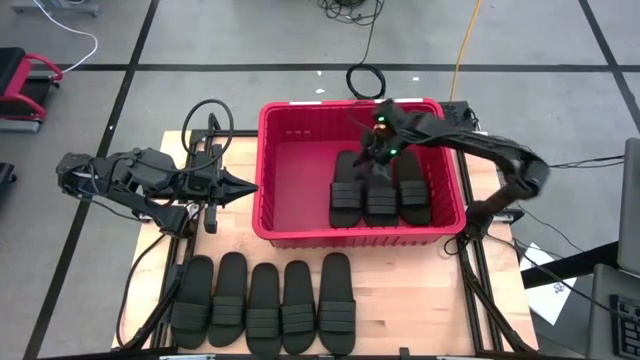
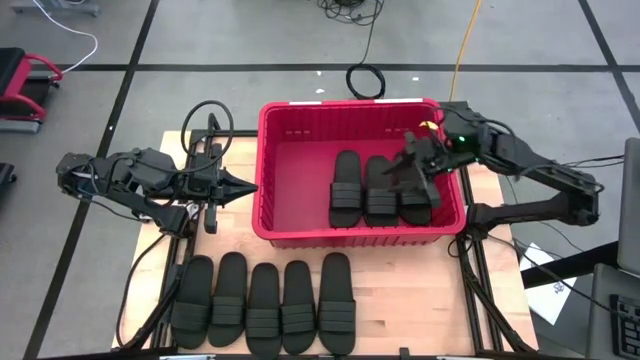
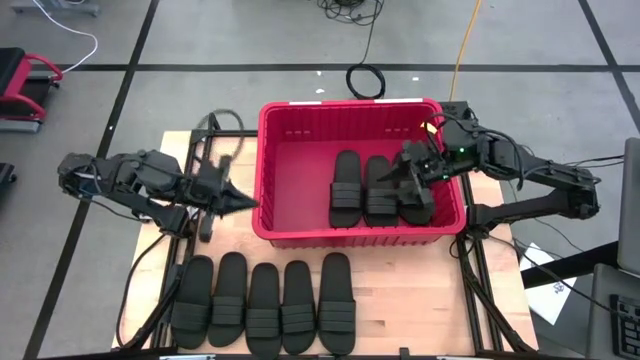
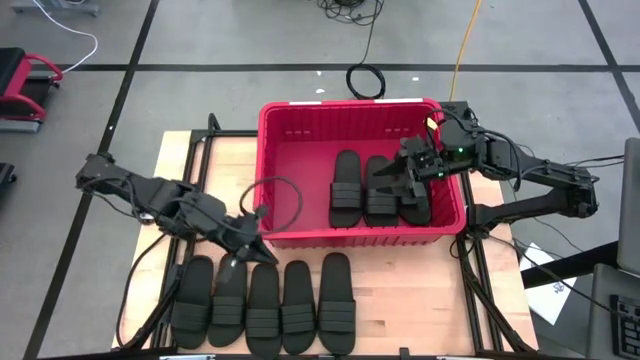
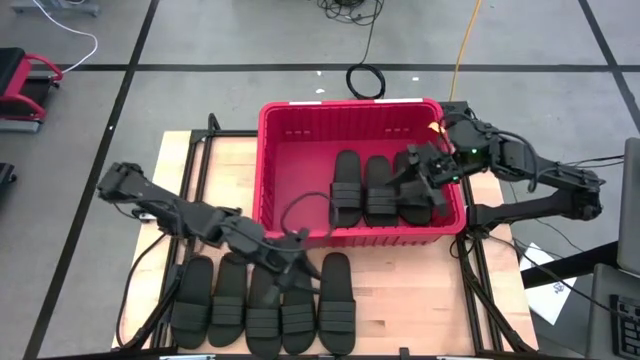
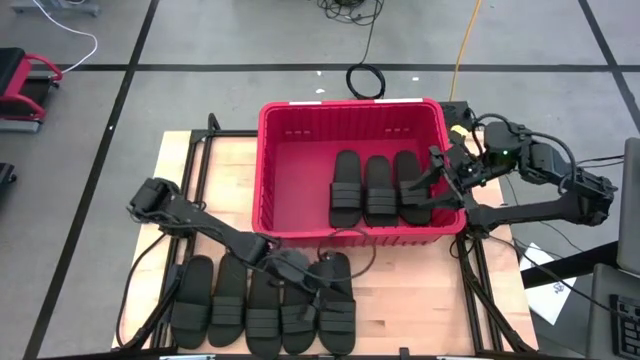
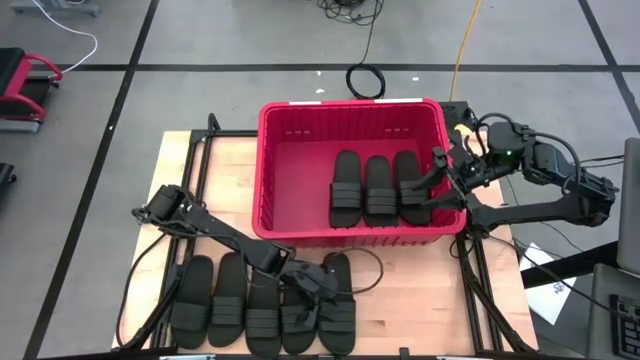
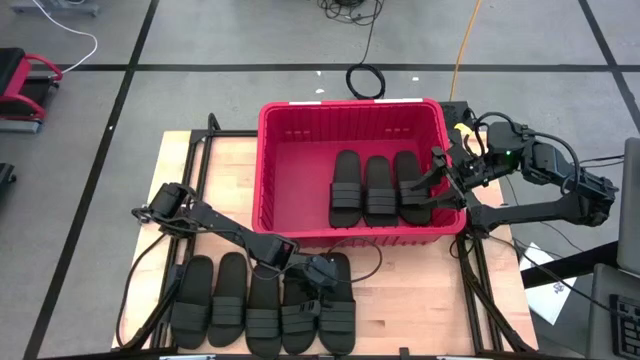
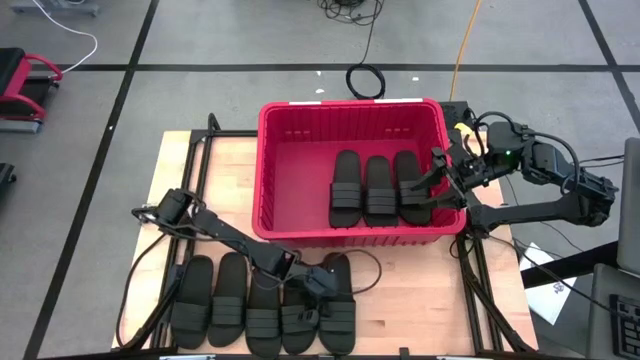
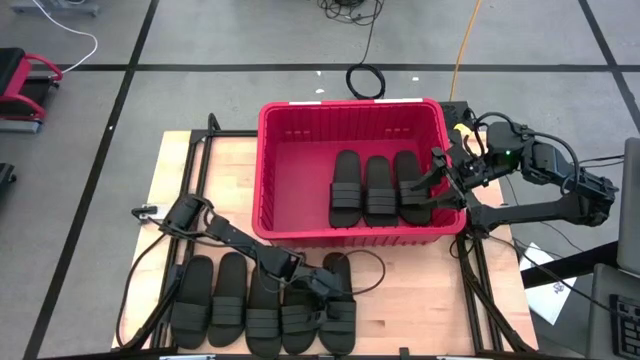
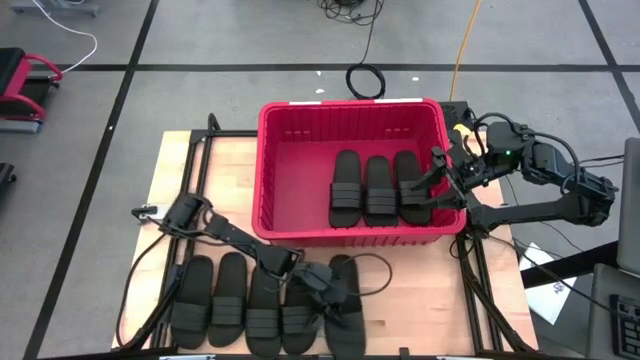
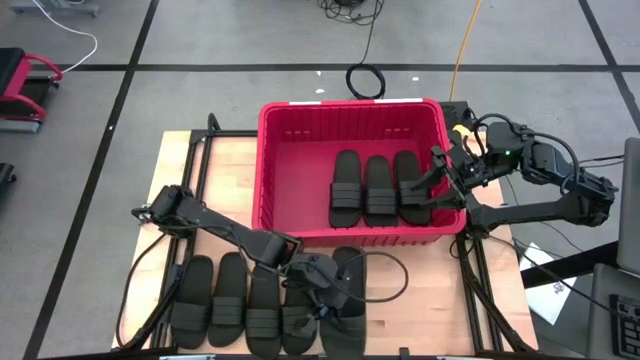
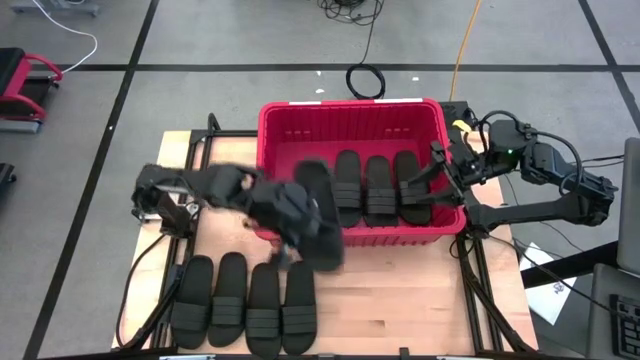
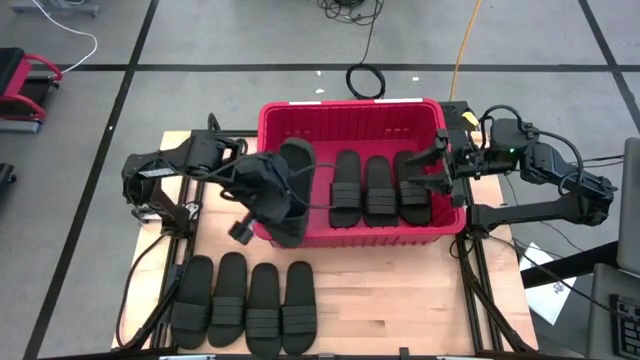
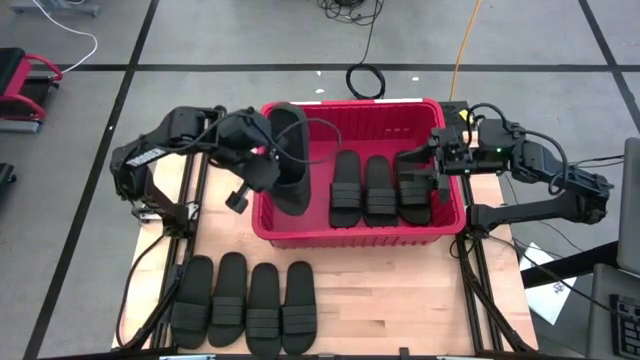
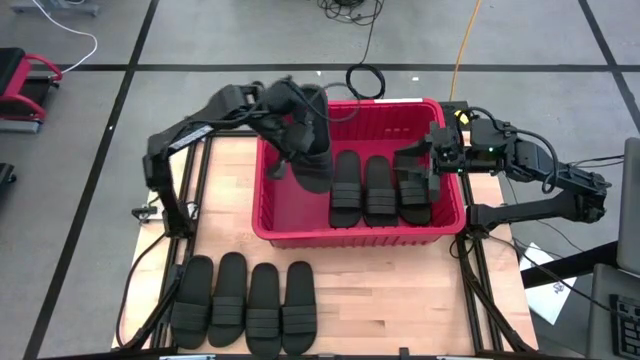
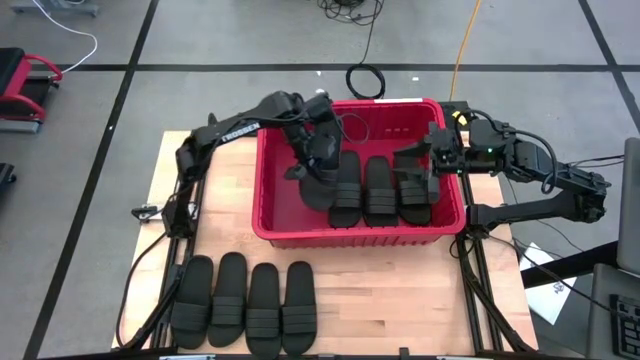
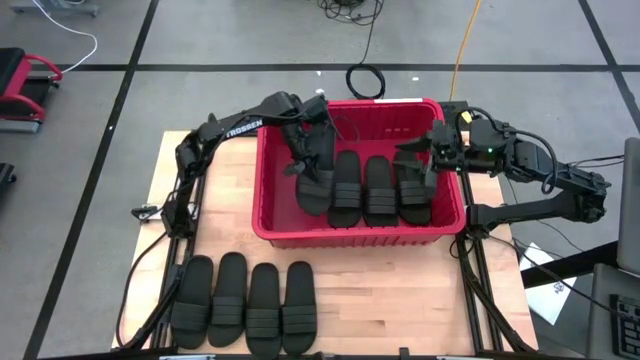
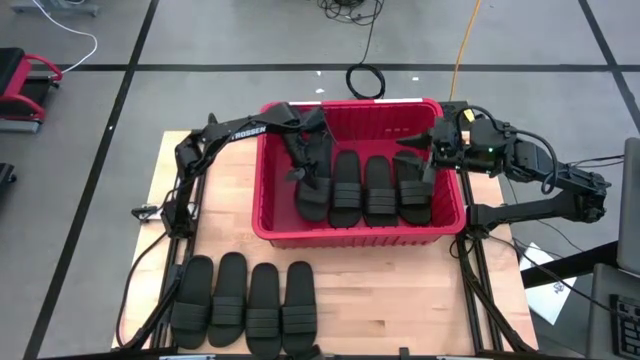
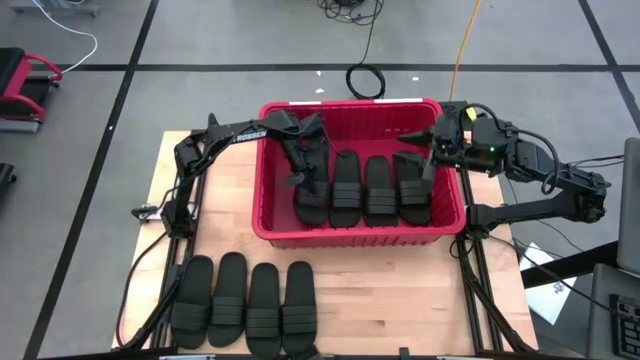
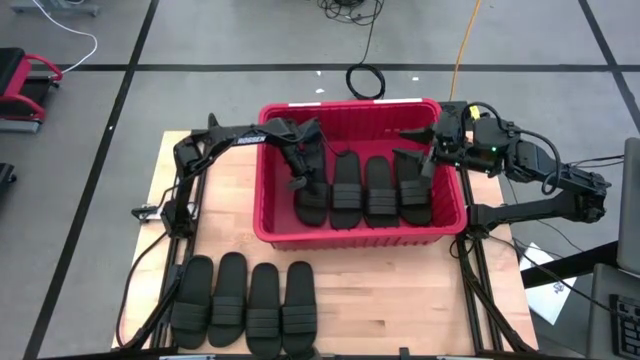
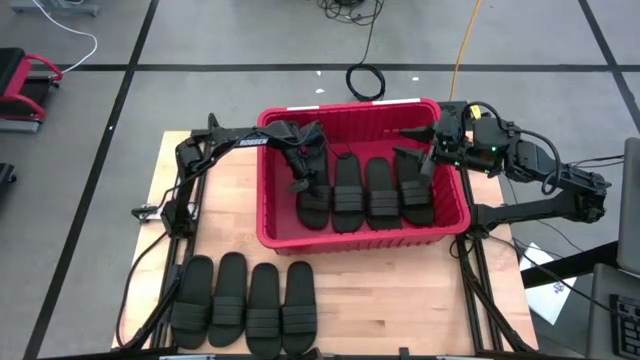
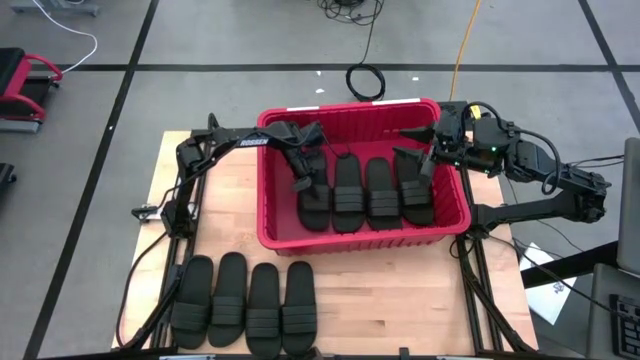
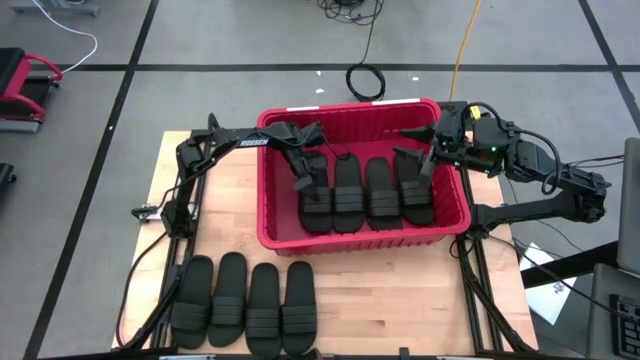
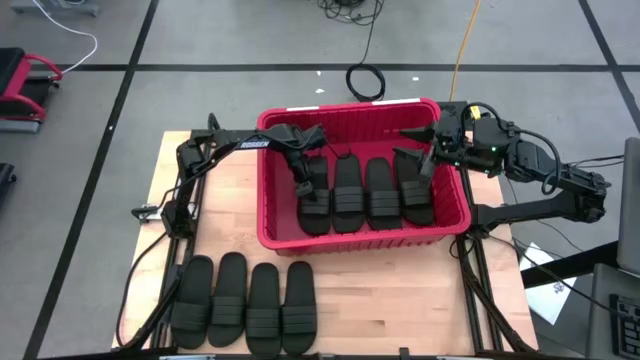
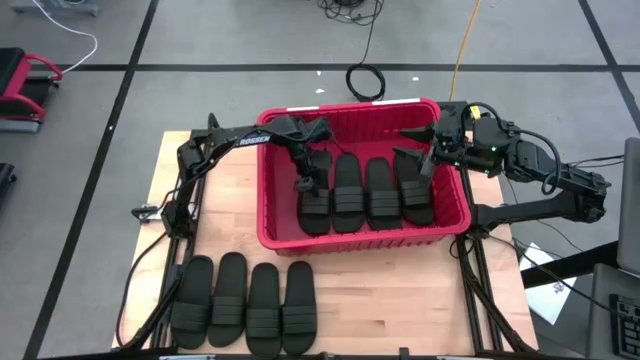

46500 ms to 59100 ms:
Task: Pick and place slides into bin
Put the black slide into the red bin

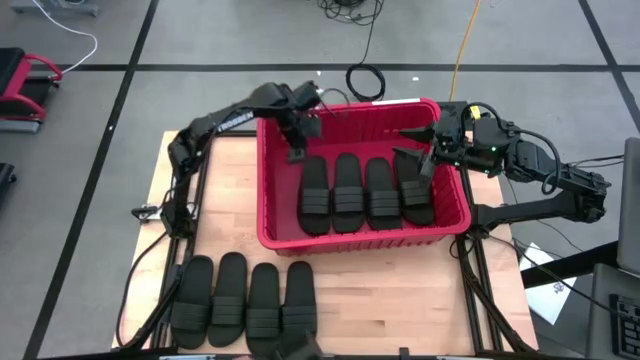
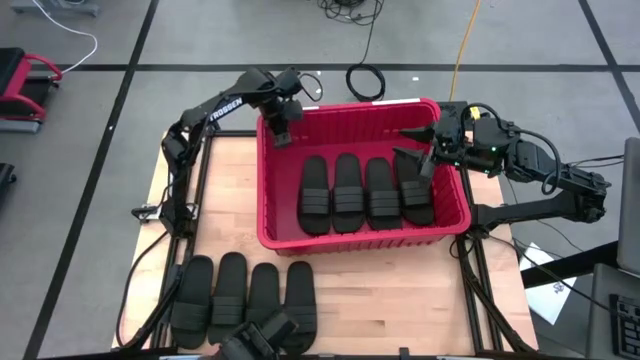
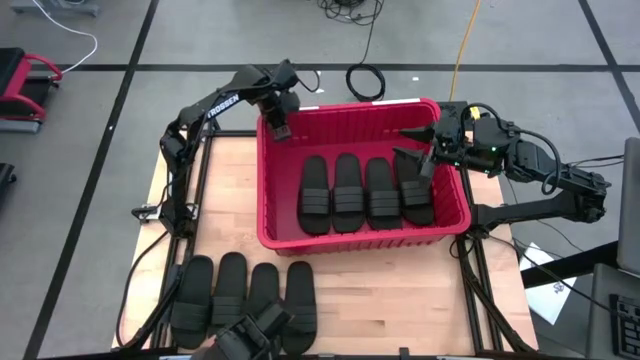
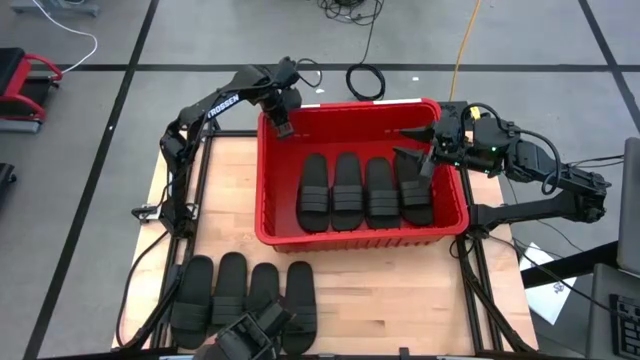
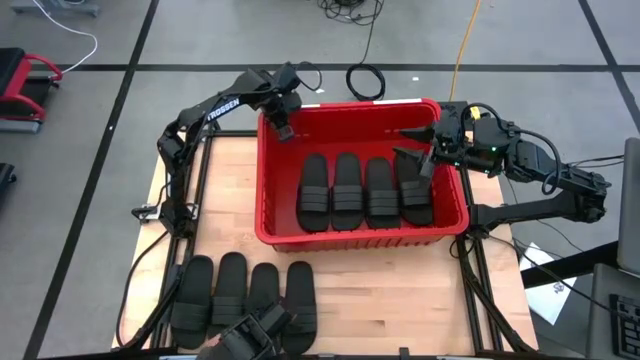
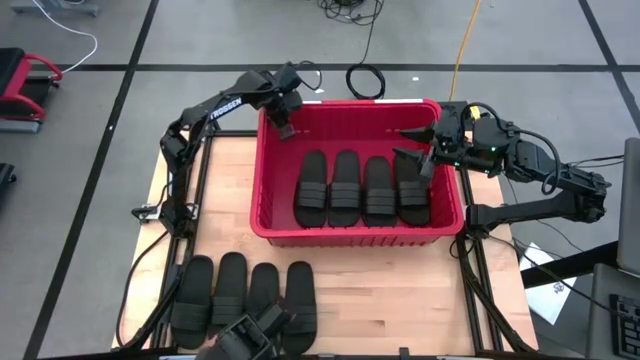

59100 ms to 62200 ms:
Adjust the red bin
